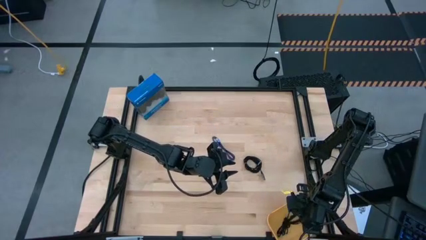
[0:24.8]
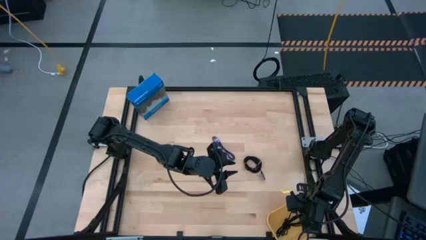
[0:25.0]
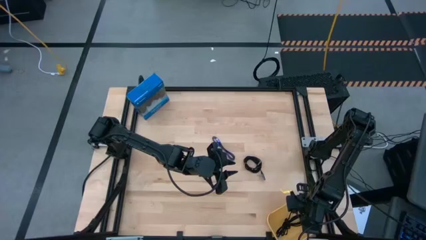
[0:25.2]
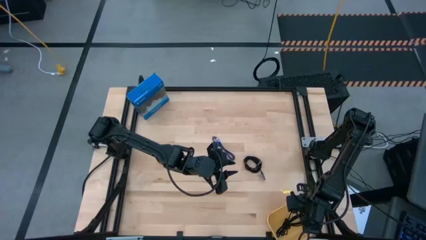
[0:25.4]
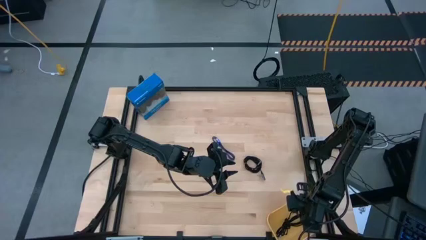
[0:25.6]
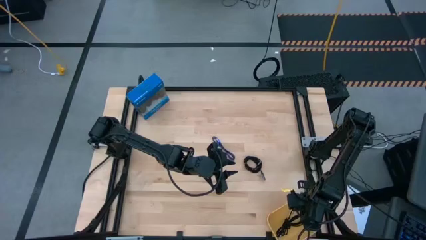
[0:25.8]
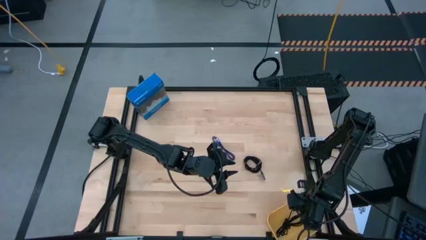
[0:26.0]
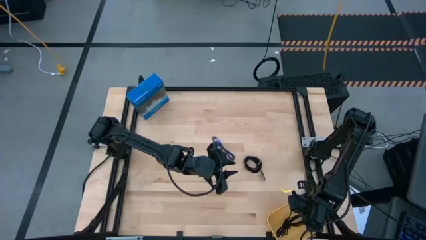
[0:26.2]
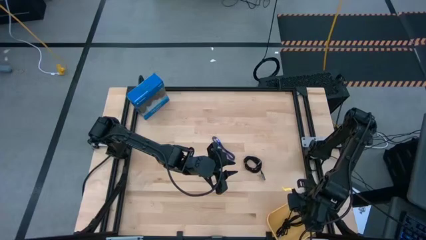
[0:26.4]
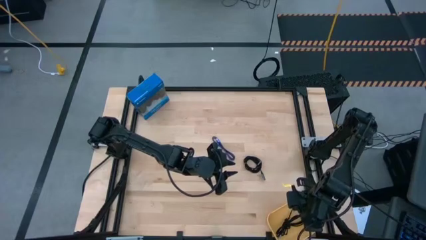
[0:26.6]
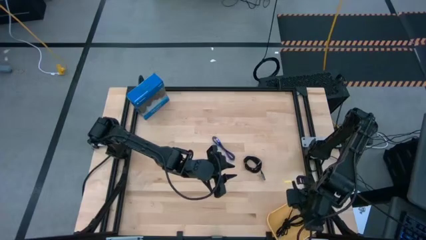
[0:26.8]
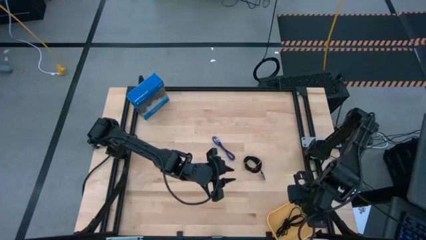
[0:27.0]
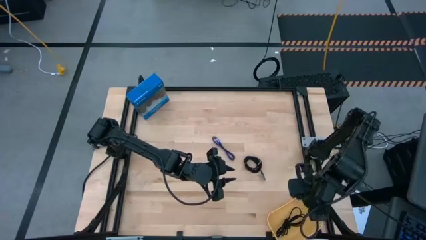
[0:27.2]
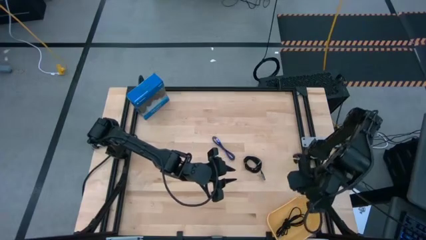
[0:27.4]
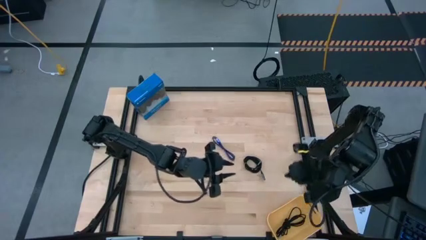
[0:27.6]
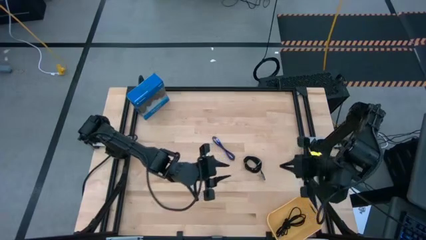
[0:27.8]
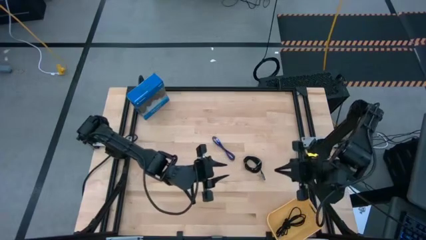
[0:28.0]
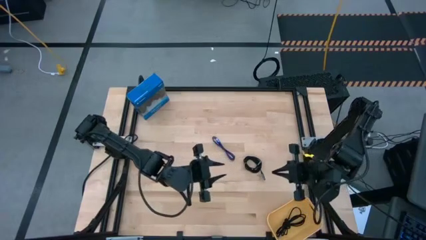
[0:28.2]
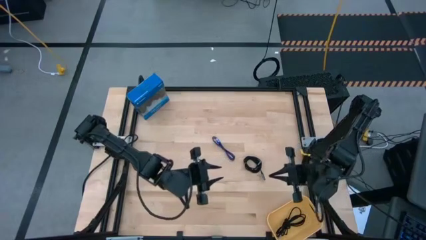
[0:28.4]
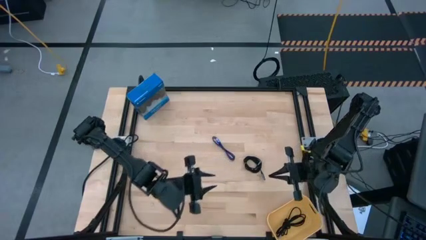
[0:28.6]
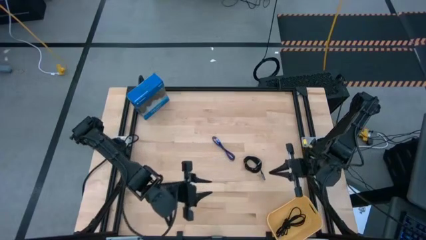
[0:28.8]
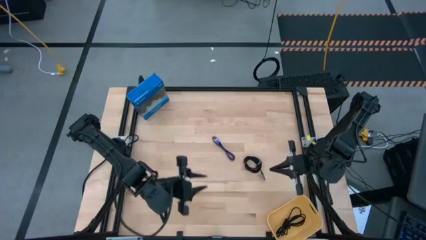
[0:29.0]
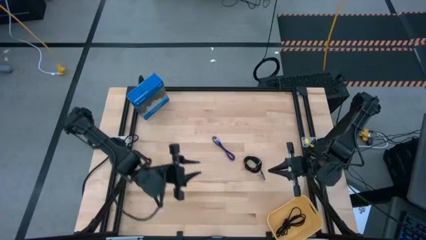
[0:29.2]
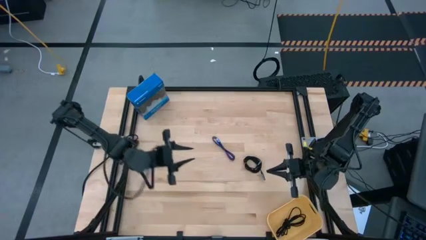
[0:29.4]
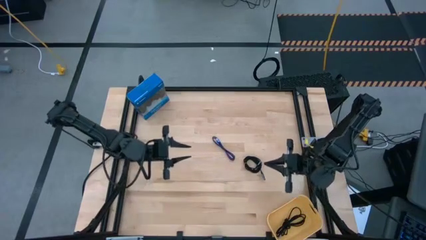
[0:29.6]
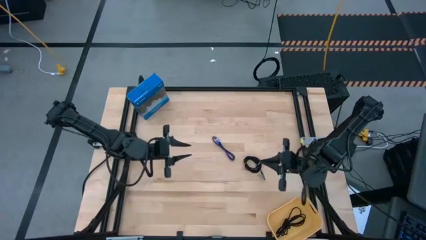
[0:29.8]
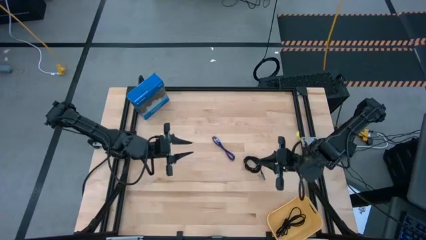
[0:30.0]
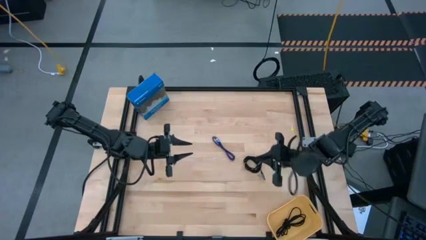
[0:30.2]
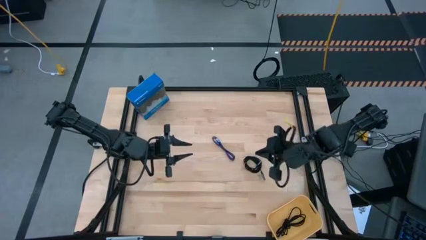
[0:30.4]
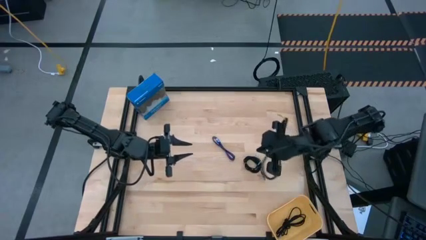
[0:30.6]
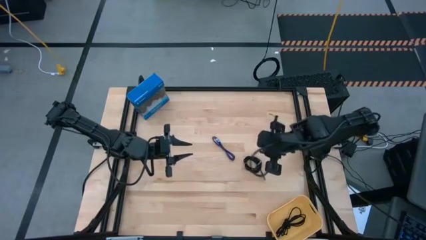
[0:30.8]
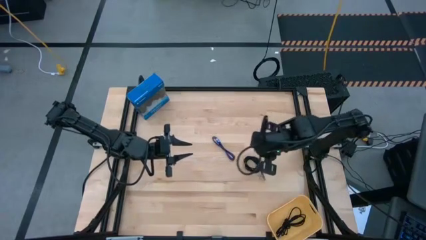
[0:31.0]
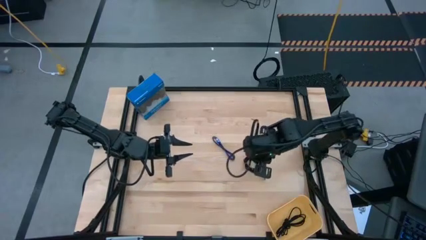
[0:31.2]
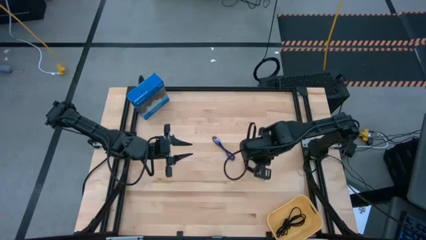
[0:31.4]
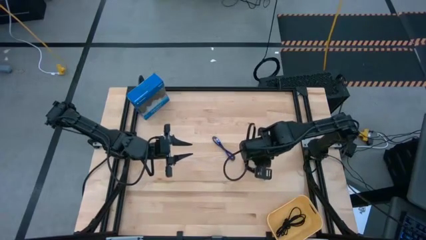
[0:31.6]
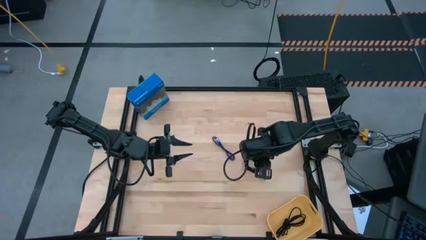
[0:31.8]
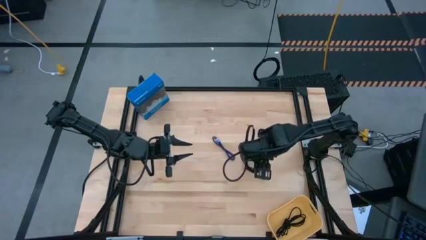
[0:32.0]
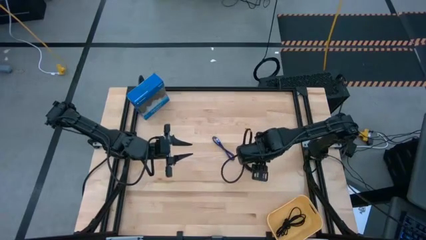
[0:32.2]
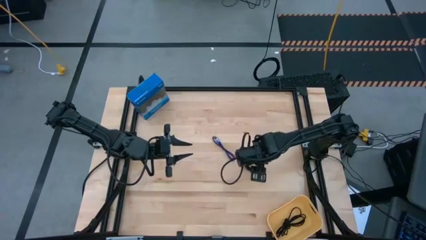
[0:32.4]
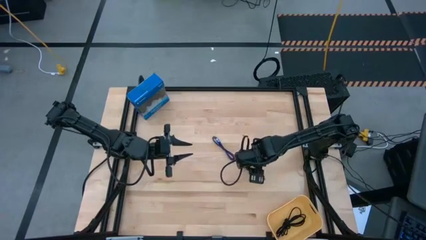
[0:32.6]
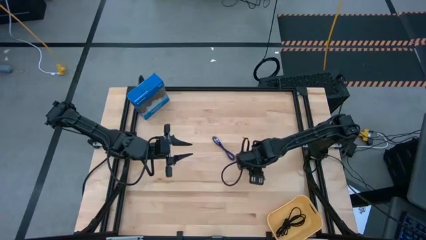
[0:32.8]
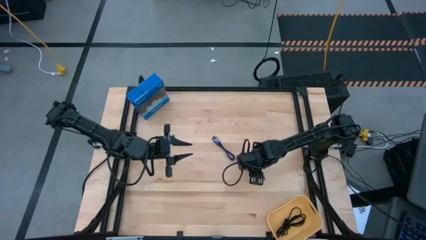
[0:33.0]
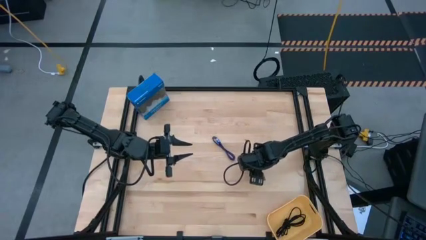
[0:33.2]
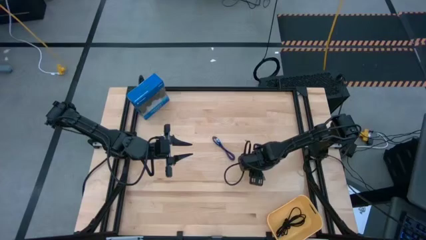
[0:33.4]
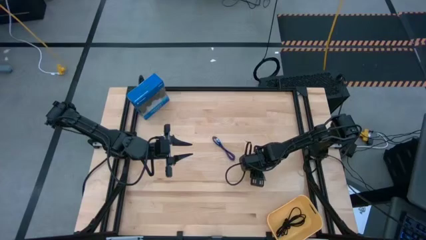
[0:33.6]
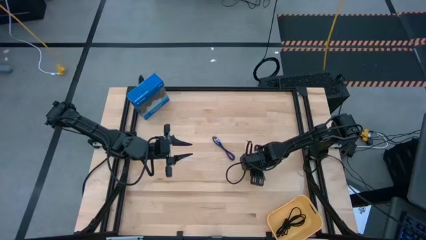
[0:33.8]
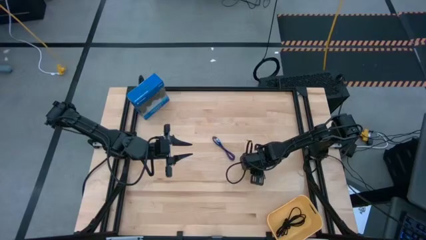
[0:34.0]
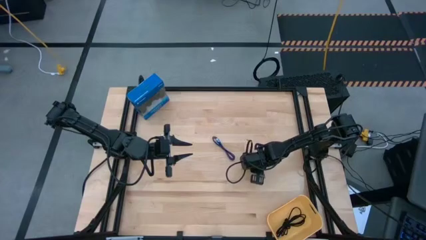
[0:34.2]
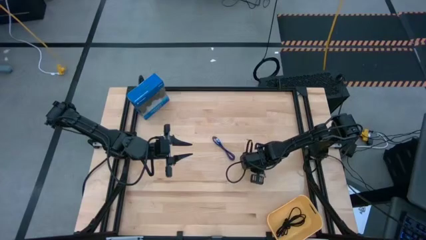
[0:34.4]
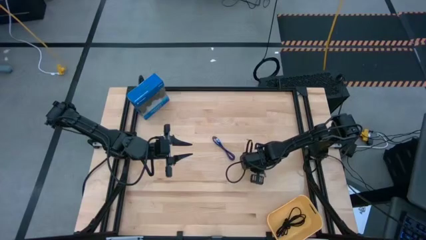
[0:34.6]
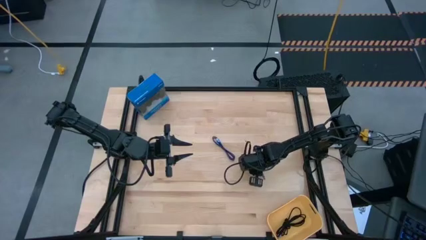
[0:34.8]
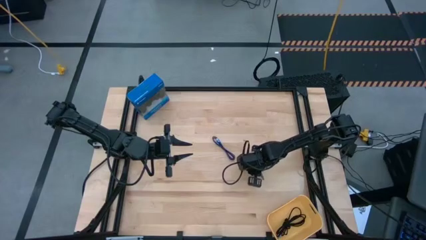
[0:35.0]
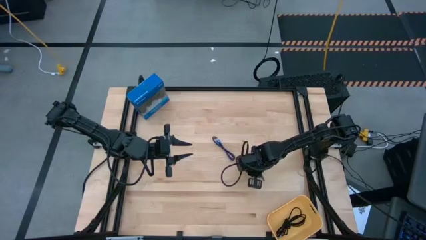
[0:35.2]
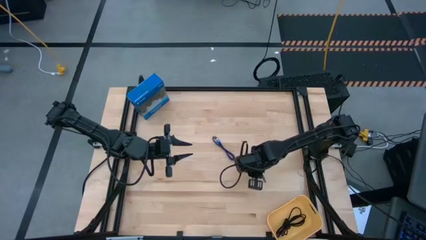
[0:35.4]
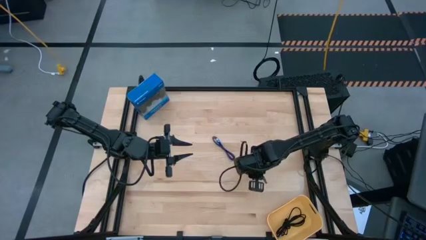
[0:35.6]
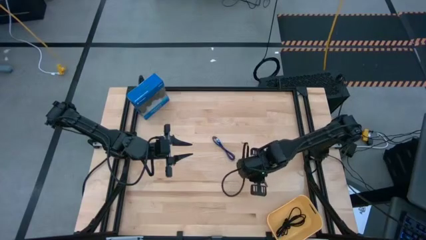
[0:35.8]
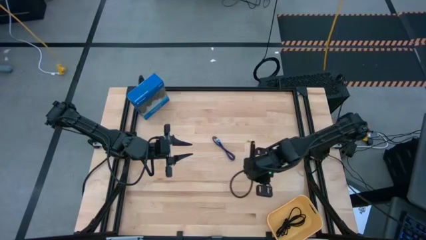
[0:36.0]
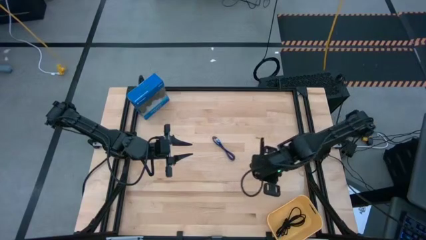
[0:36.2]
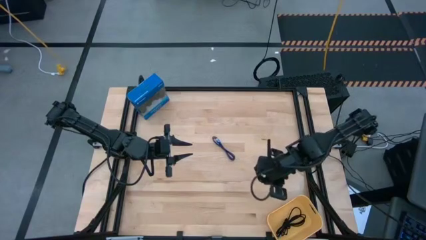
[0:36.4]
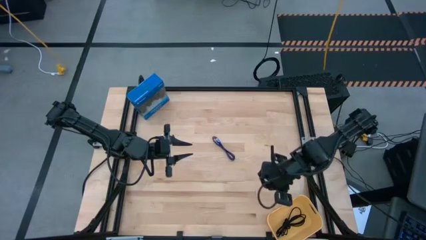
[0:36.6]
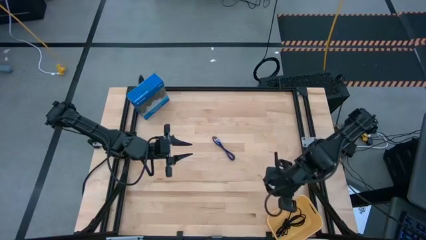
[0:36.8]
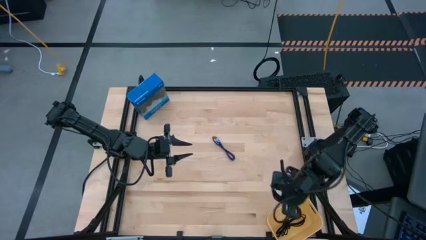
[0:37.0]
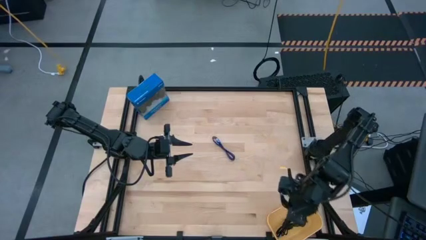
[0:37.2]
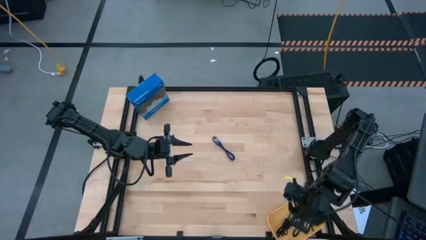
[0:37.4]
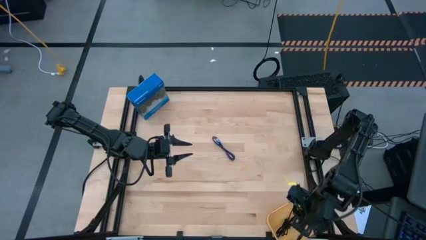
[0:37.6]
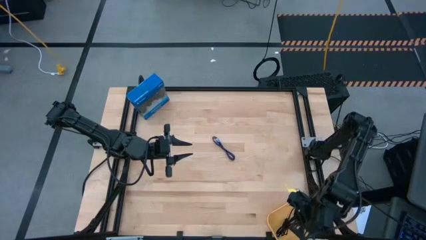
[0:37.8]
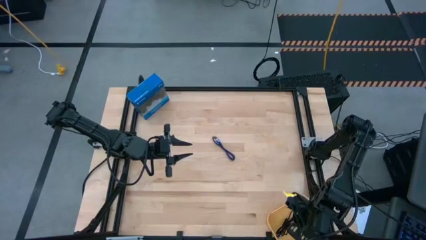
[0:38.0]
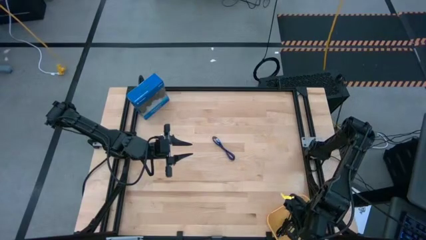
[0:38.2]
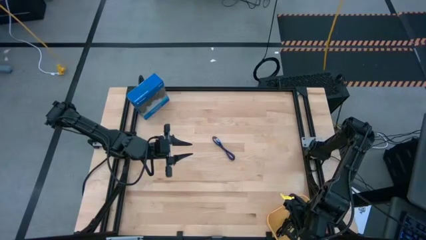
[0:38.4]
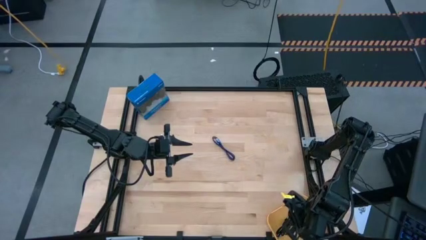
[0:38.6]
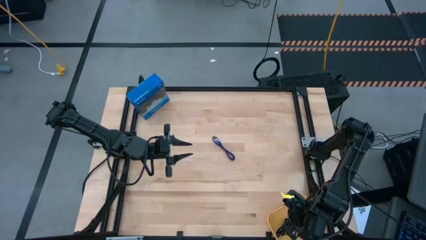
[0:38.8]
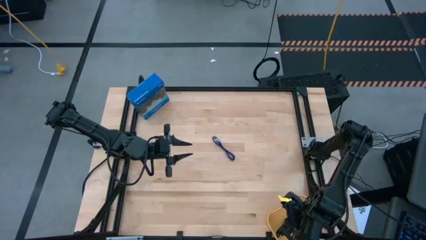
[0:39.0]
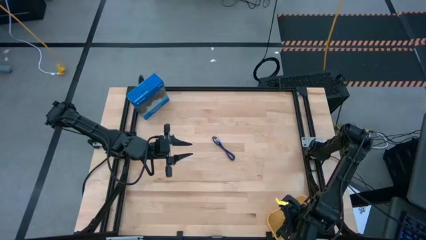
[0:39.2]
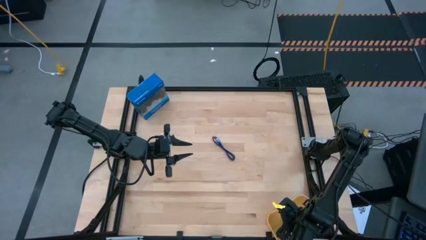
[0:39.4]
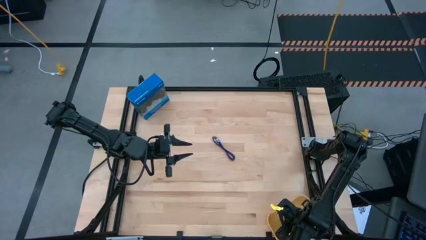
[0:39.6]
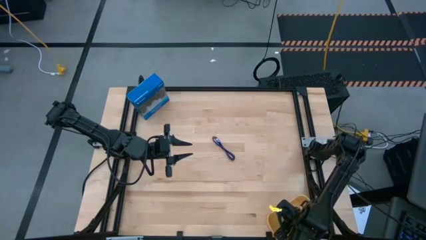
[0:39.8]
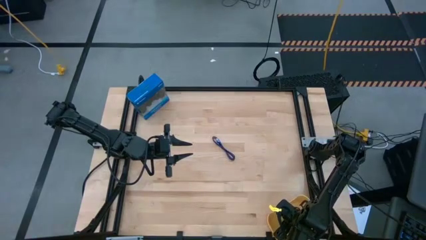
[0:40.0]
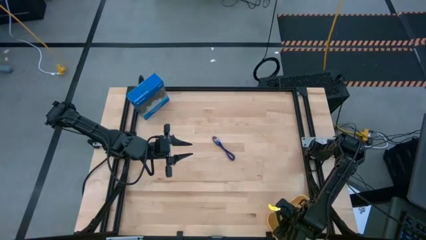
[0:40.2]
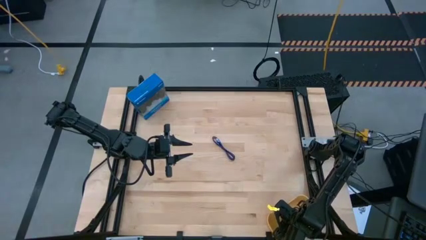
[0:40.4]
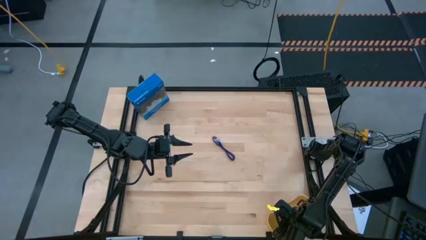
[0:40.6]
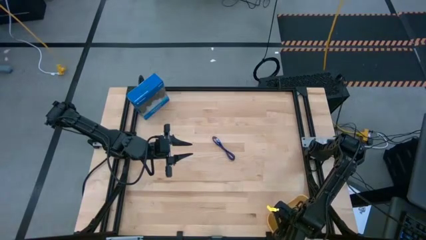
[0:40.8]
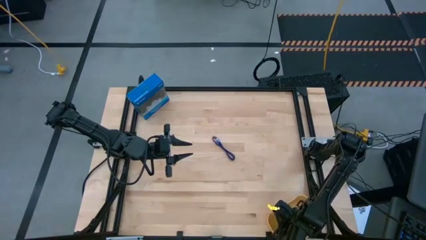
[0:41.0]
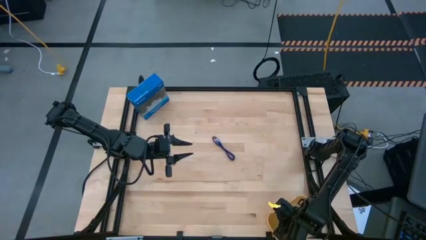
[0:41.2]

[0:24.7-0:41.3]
Task: Pick and place USB-C Cables
Put the black charger cable into the yellow bin
